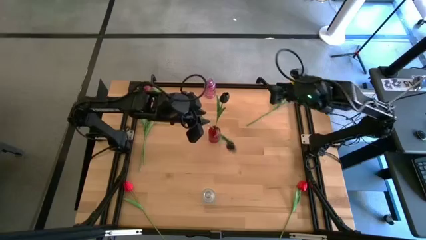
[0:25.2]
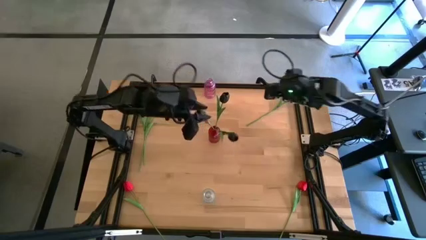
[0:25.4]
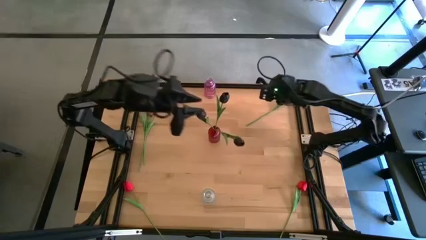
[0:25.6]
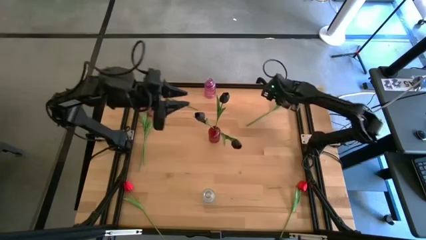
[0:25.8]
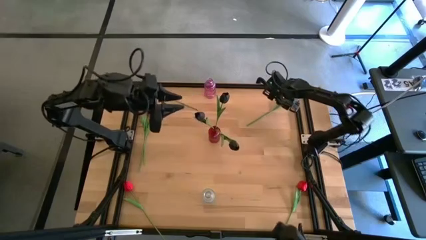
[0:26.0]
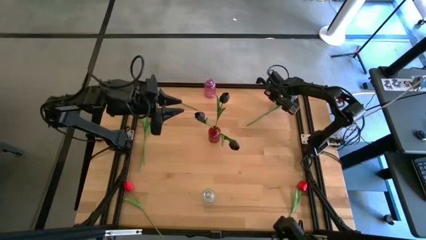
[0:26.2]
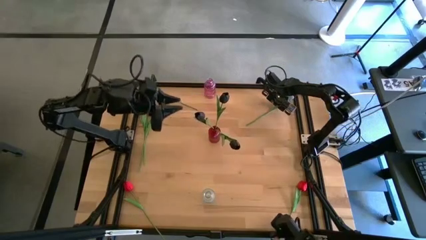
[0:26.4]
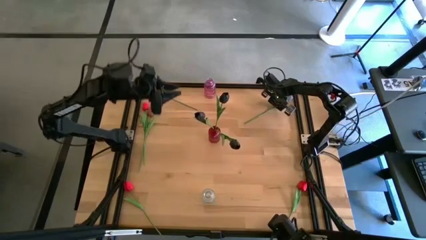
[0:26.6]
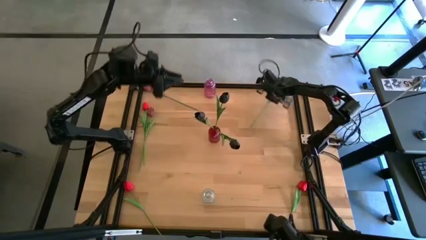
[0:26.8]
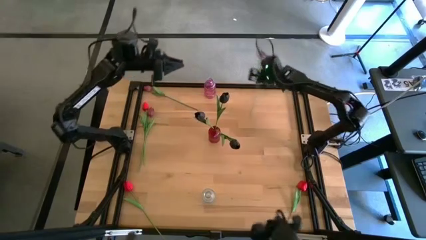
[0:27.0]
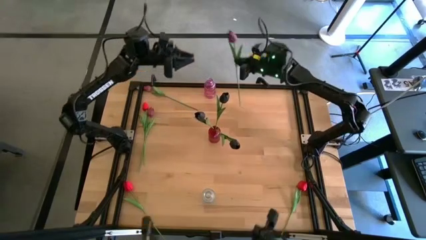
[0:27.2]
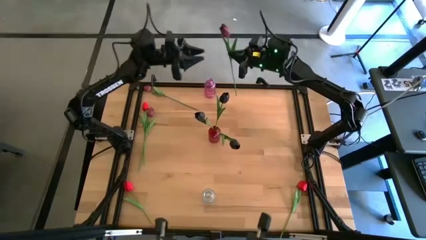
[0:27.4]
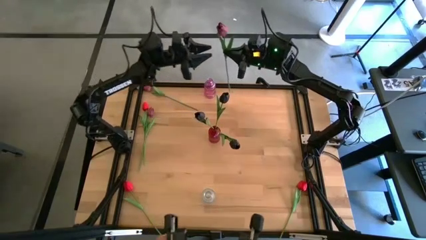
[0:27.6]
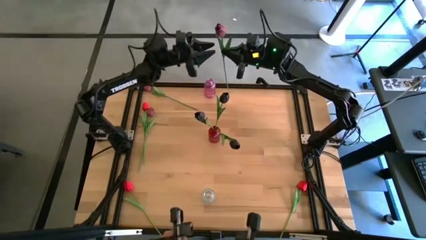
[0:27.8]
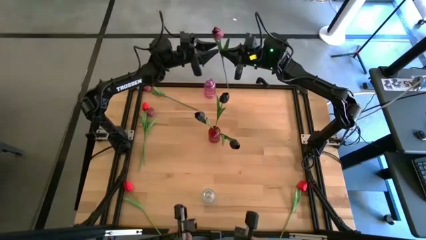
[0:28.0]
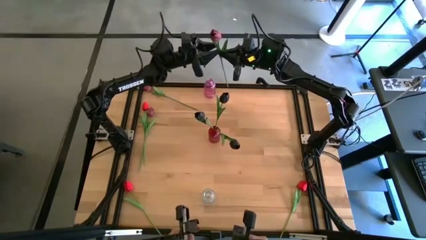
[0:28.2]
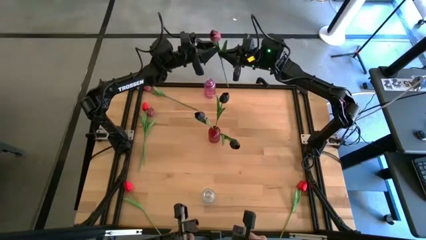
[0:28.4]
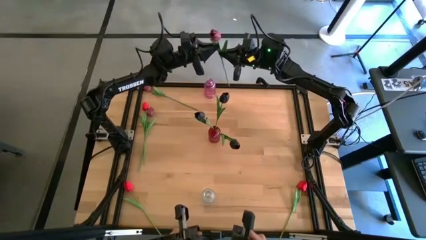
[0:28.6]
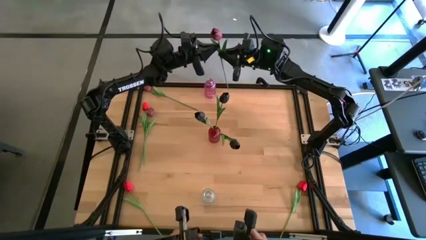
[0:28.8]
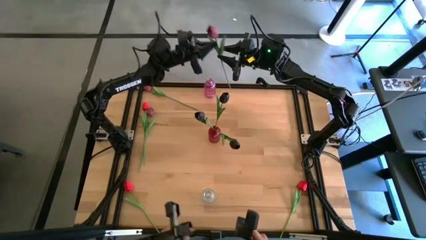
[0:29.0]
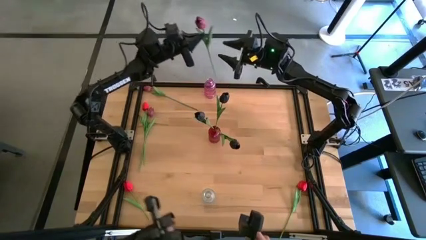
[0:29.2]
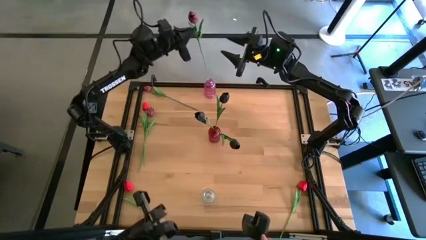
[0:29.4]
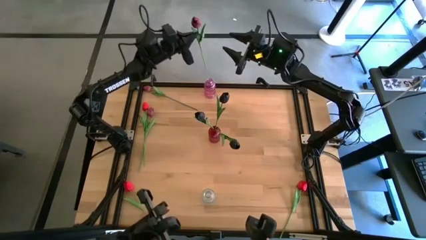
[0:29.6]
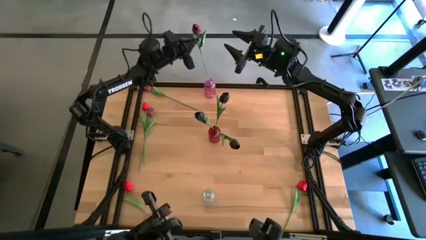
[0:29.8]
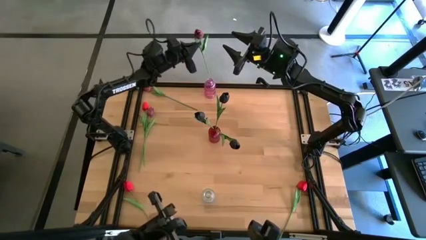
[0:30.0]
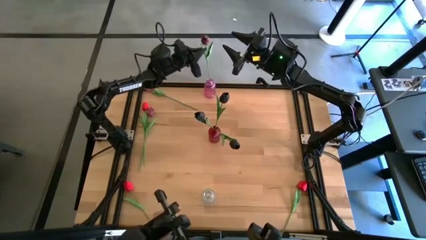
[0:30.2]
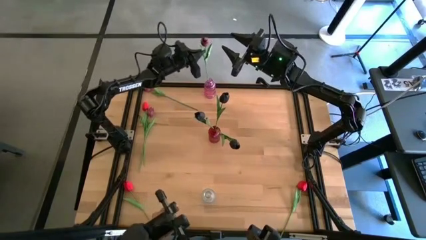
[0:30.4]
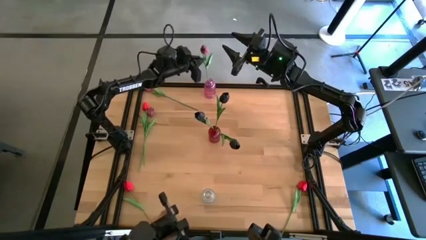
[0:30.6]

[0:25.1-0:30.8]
Task: Sort flowers into vase by color
Put the right dark red tulip into the pink vase

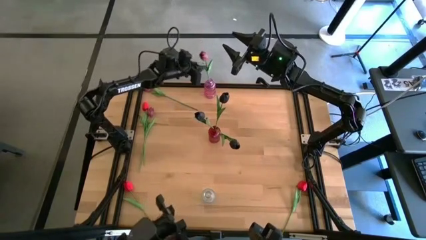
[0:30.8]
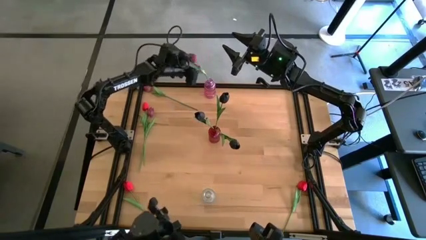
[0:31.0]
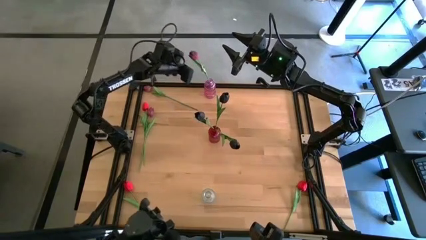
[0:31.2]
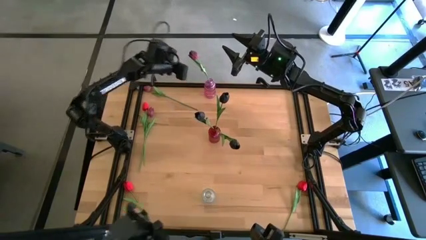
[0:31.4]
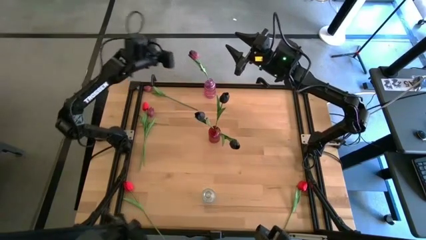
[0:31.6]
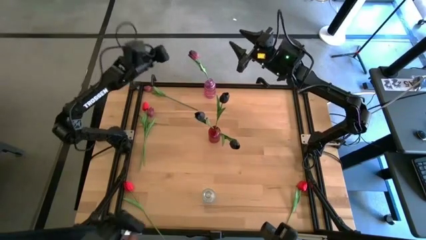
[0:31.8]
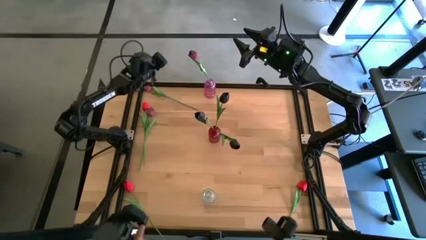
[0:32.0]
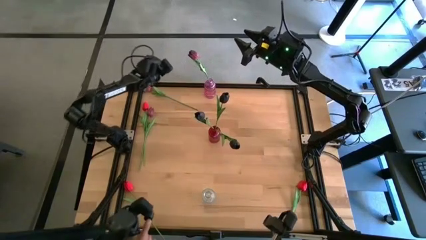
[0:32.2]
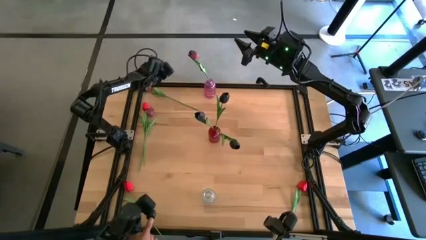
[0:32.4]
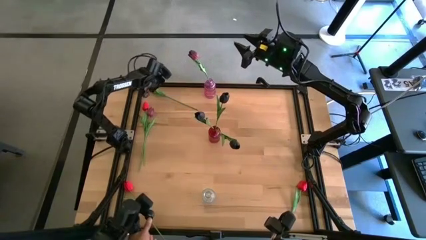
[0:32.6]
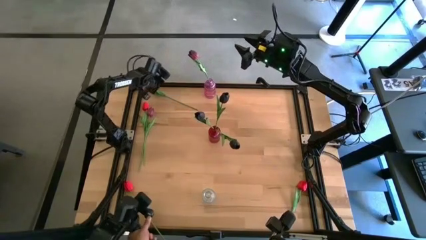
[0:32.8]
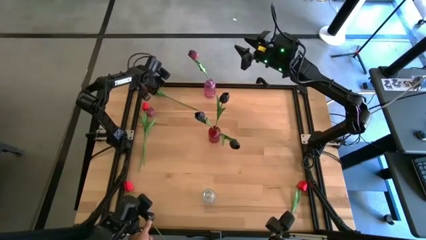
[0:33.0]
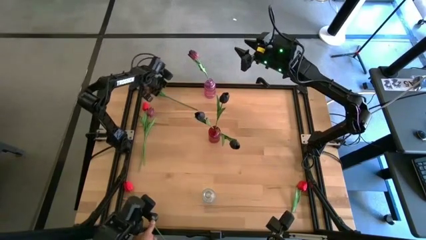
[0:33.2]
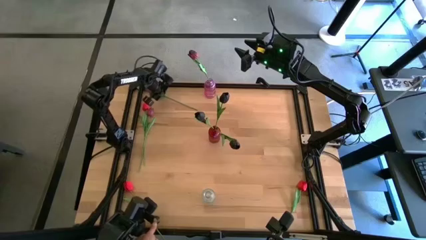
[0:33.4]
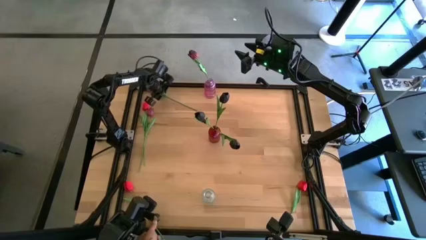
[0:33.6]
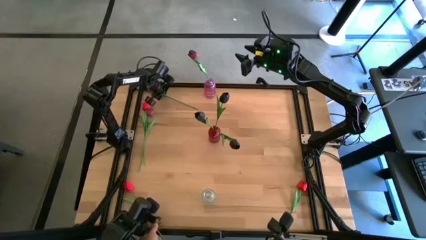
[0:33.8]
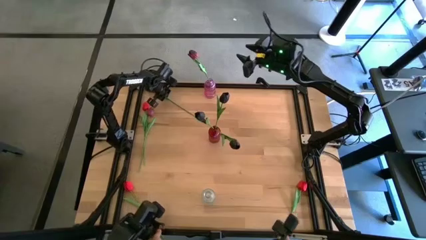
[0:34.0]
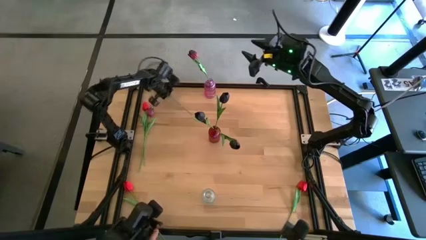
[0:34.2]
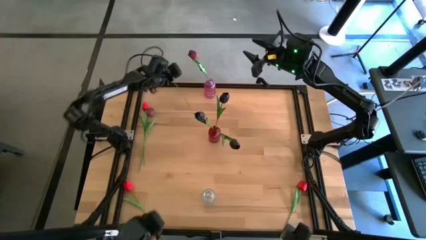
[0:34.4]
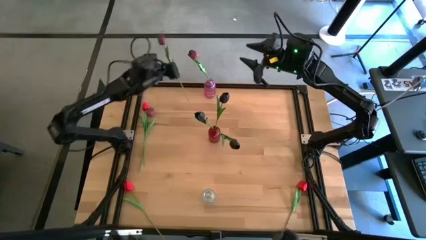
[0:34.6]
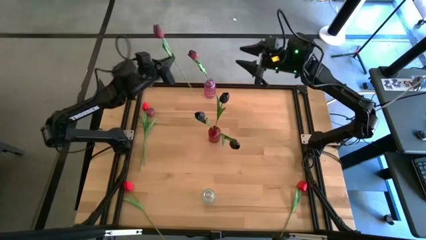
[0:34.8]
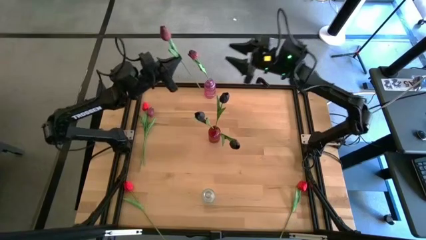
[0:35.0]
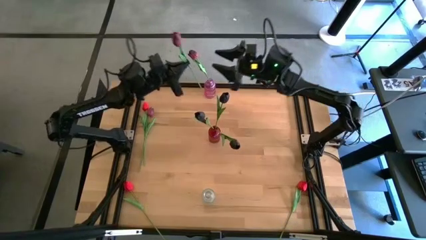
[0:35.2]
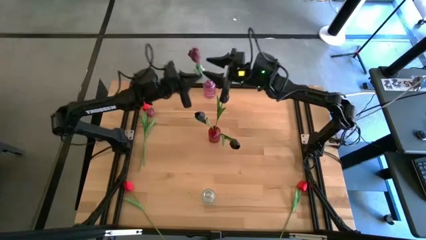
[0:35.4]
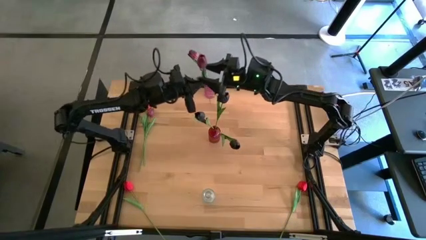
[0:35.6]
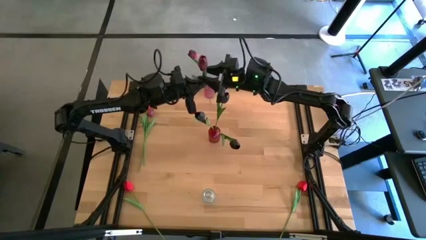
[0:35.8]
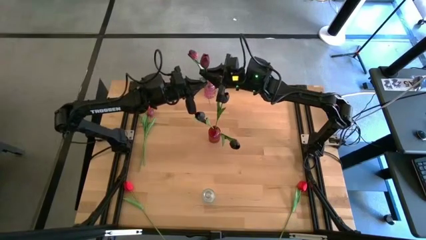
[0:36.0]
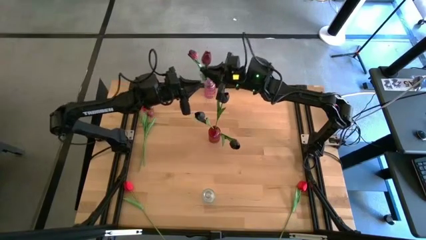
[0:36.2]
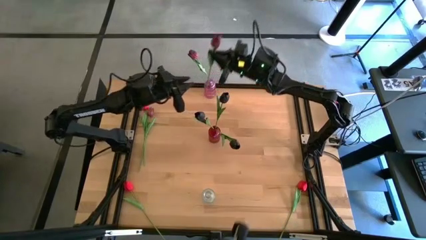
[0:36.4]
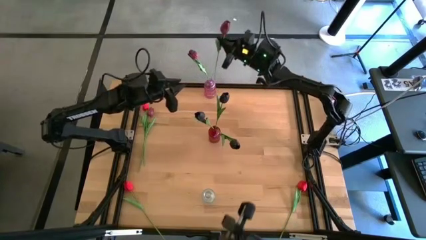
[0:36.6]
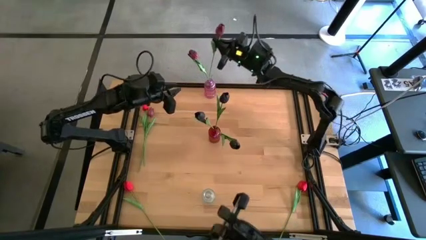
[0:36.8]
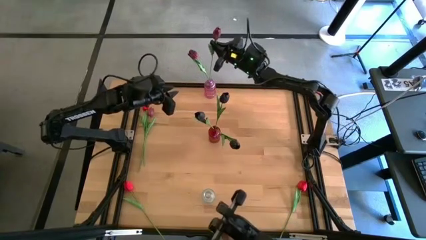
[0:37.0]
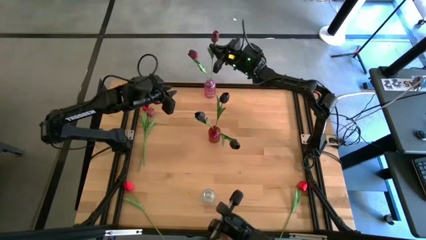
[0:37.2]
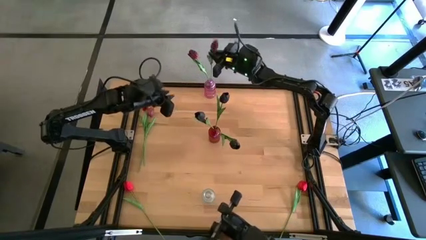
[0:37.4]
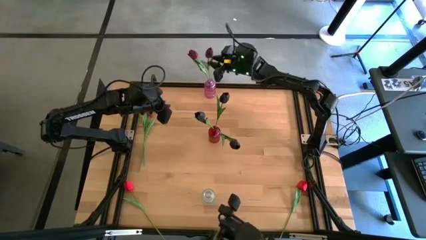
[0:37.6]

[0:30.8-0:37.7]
Put the top dark red tulip into the pink vase

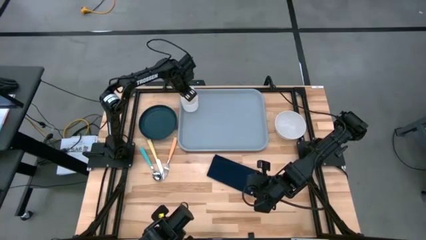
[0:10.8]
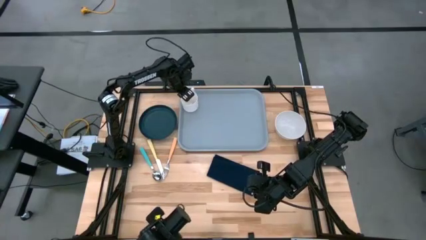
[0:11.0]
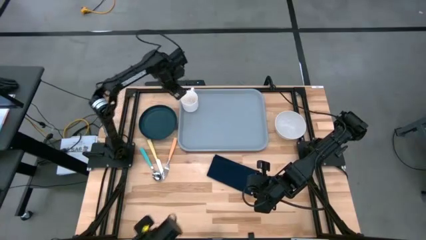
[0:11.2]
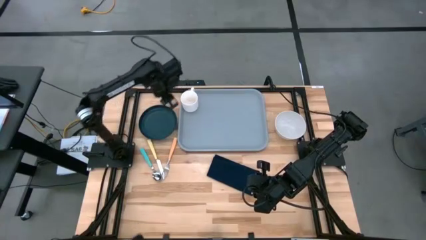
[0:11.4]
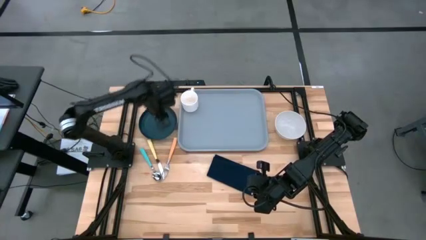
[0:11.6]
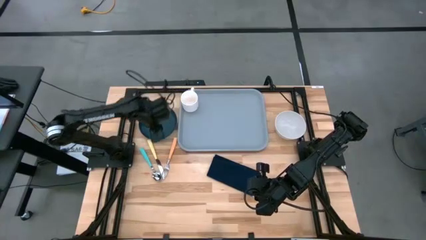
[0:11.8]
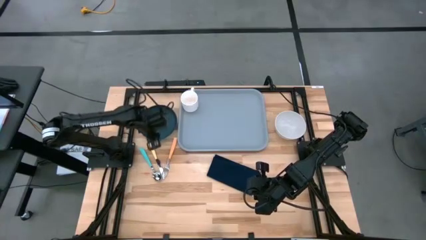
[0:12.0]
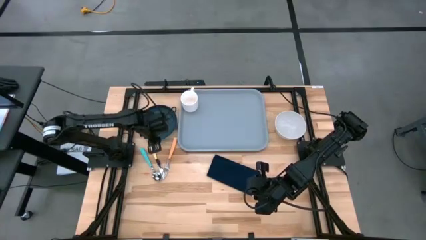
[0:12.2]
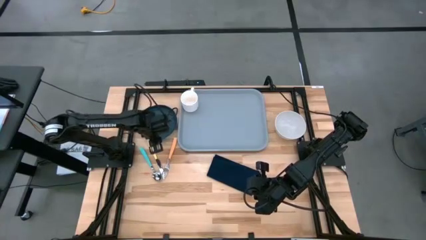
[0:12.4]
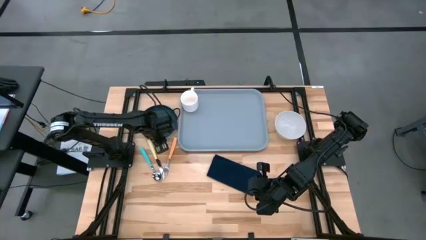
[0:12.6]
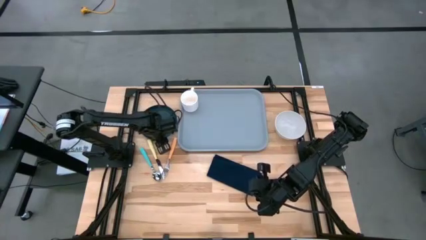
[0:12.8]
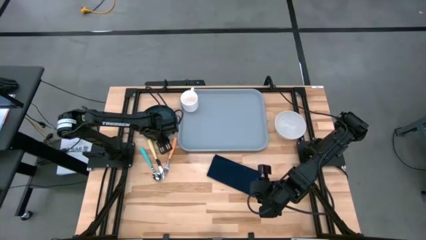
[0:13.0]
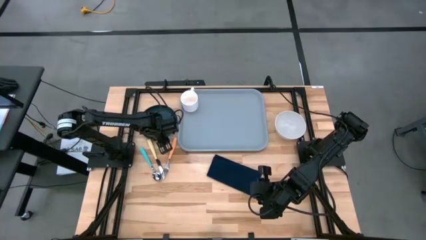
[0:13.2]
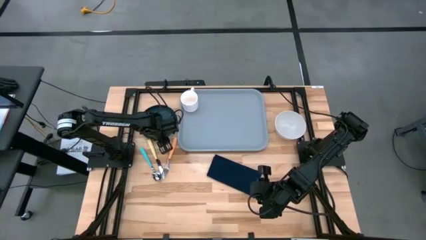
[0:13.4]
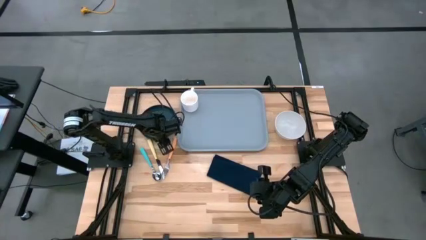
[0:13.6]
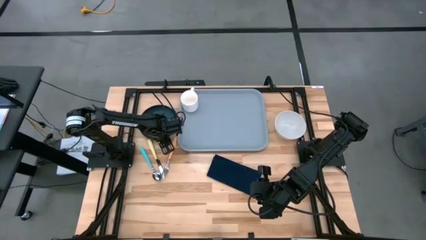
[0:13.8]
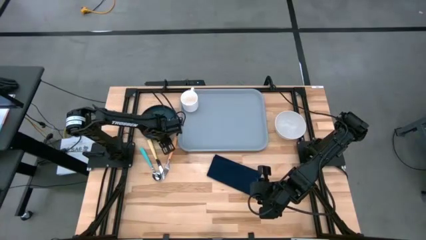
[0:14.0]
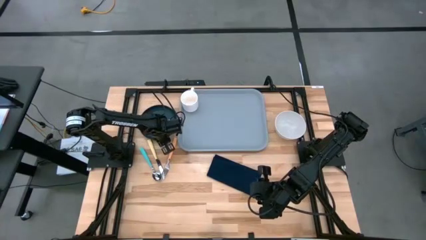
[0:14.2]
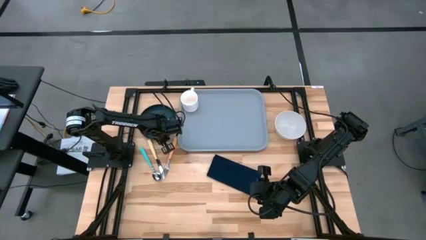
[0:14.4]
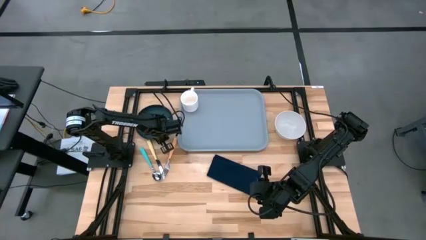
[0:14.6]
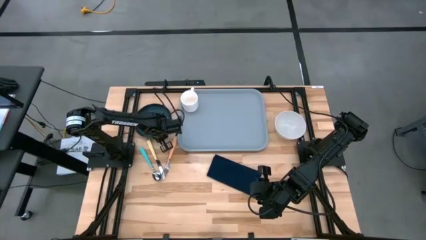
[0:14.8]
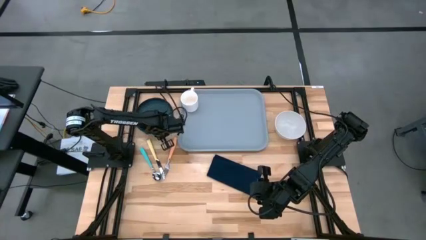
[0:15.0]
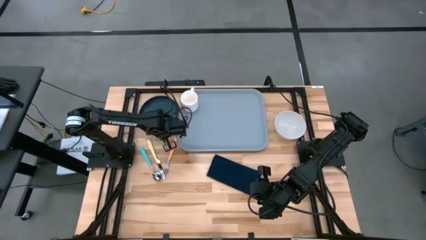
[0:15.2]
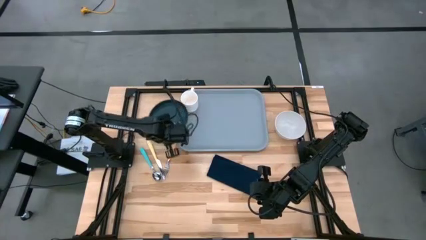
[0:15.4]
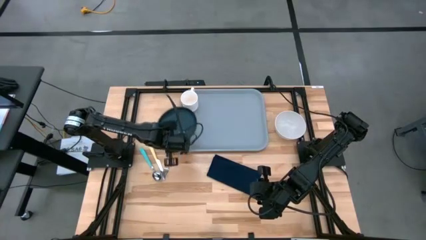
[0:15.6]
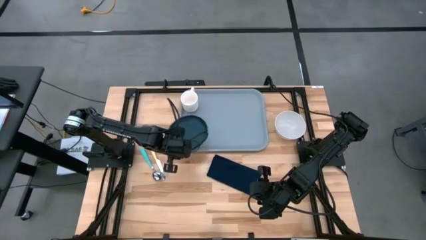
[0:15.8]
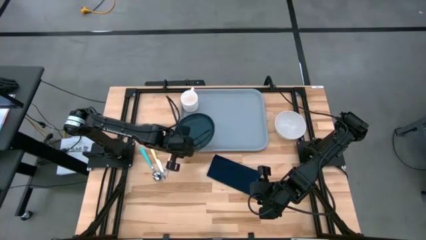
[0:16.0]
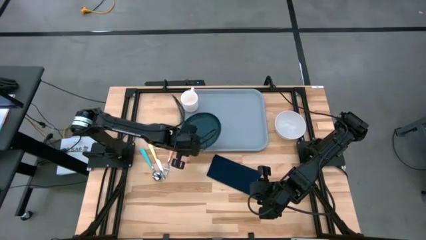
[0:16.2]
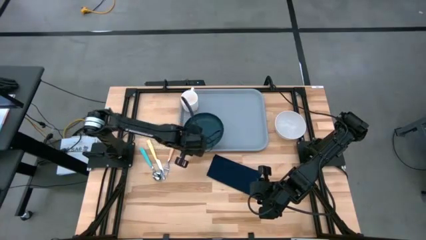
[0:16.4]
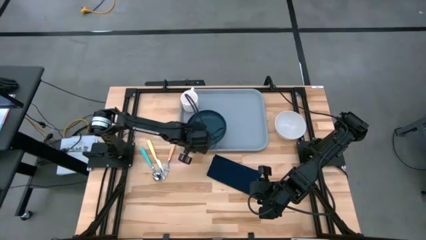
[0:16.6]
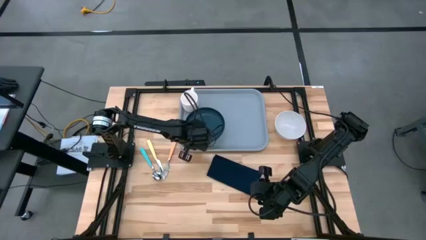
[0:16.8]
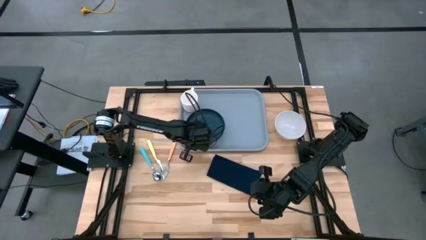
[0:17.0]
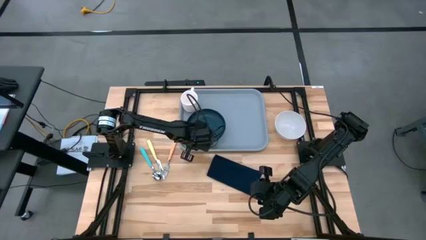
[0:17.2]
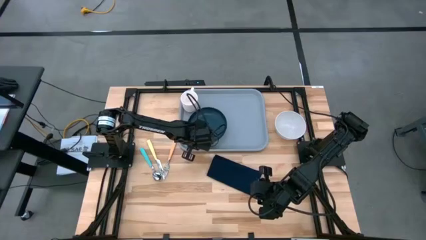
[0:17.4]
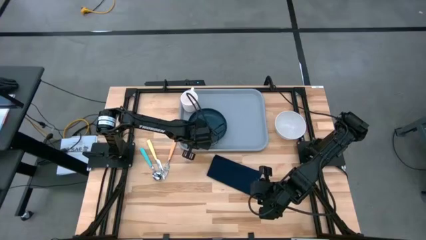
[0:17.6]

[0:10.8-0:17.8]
Task: Set up tray
Put the dark blue plate to the bottom right of the white mug on the gray table tray
